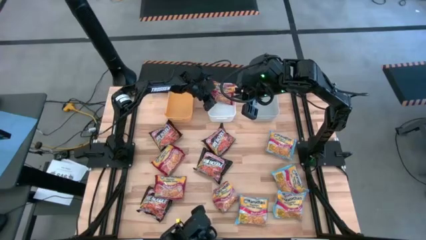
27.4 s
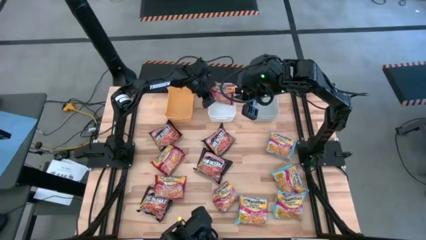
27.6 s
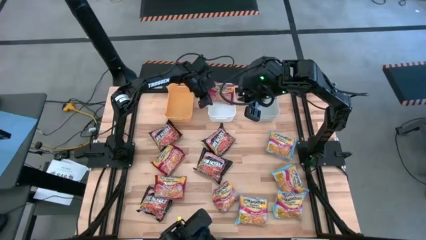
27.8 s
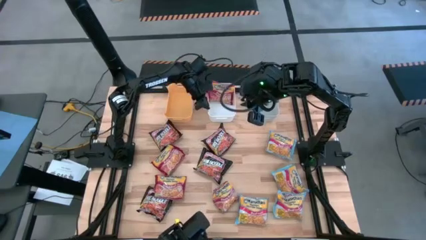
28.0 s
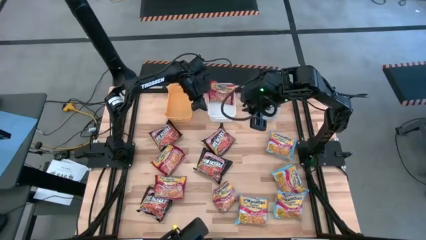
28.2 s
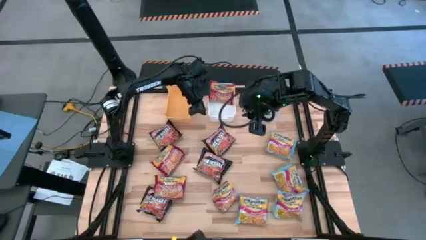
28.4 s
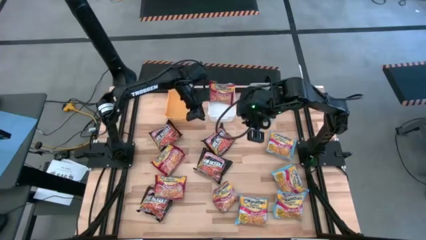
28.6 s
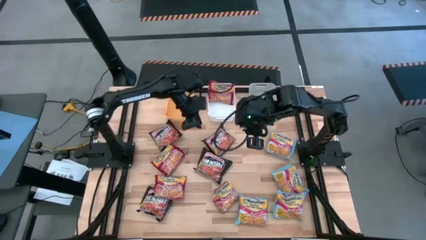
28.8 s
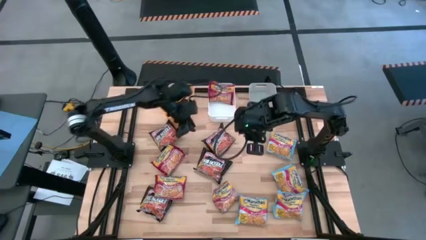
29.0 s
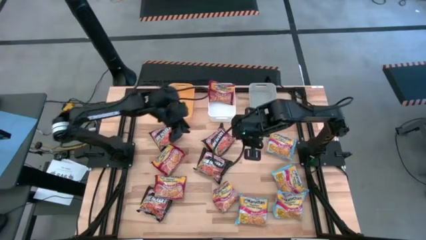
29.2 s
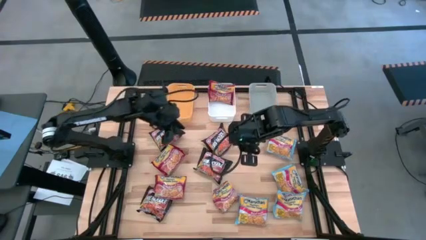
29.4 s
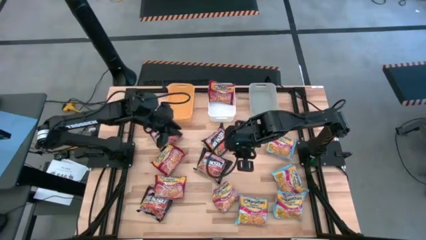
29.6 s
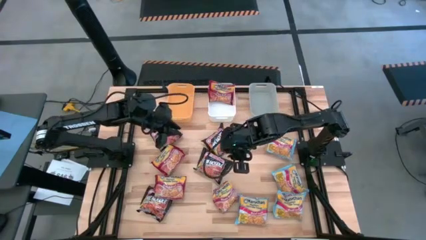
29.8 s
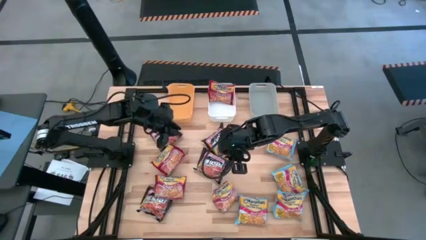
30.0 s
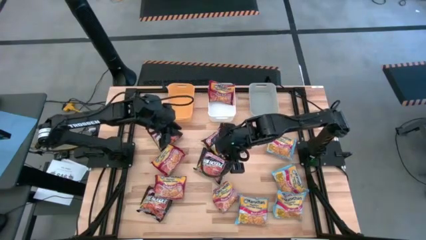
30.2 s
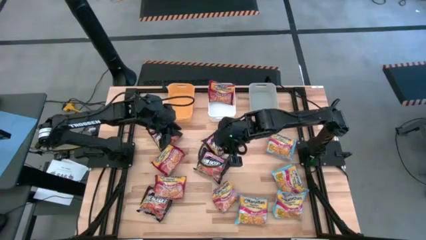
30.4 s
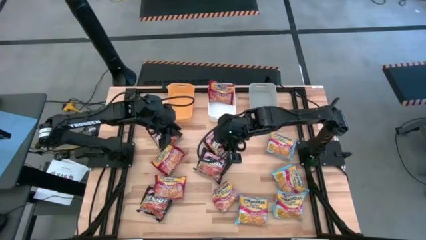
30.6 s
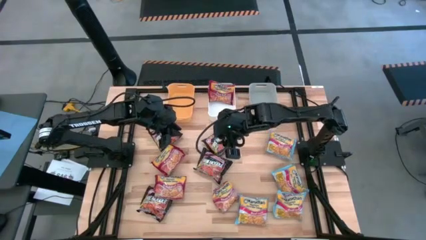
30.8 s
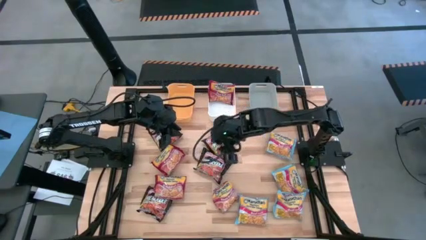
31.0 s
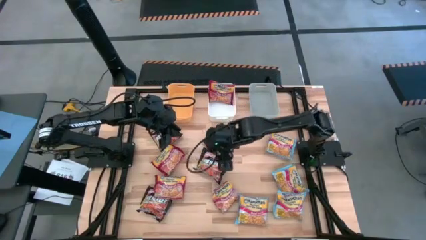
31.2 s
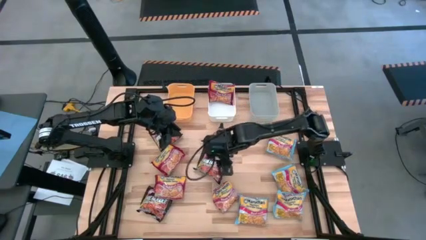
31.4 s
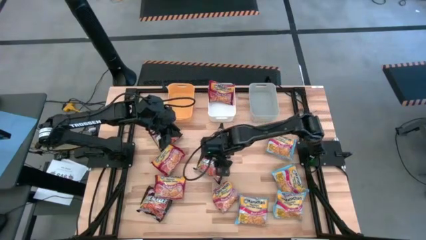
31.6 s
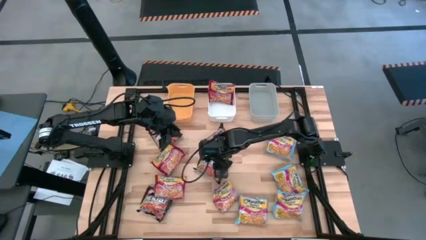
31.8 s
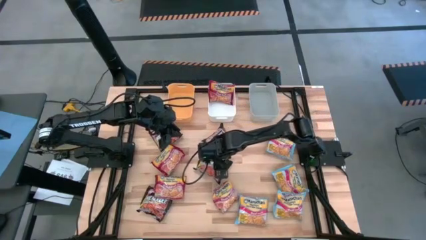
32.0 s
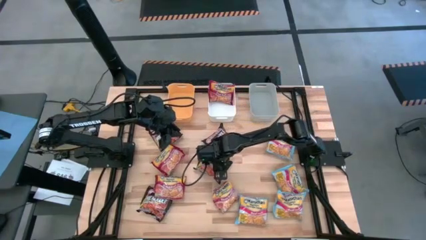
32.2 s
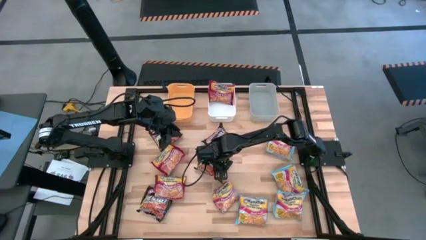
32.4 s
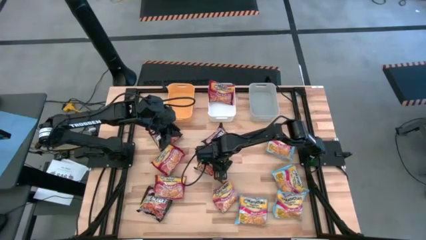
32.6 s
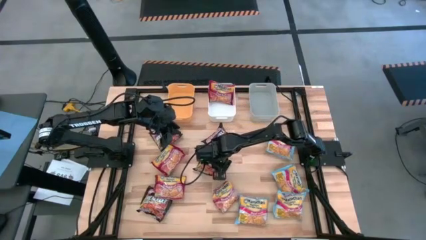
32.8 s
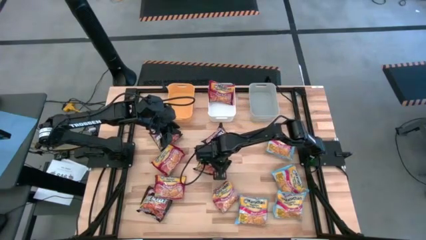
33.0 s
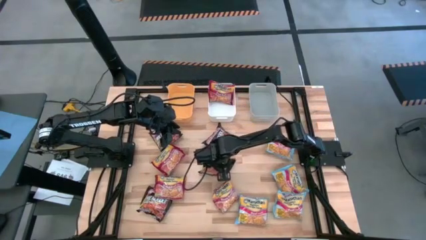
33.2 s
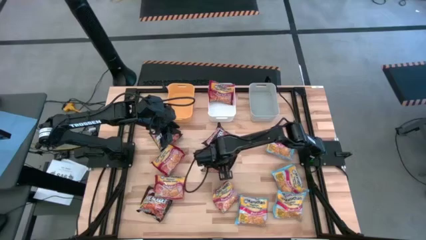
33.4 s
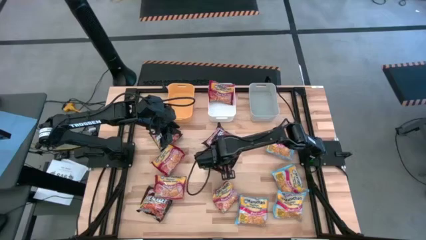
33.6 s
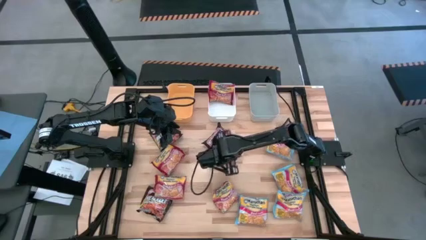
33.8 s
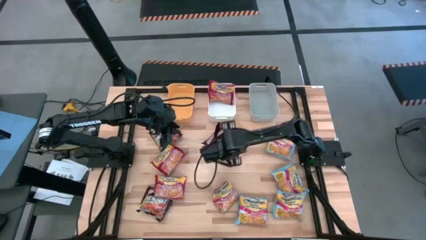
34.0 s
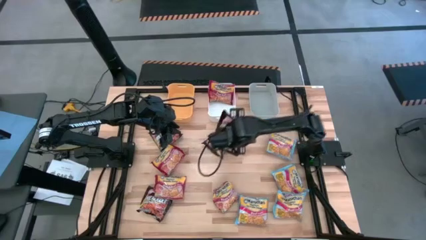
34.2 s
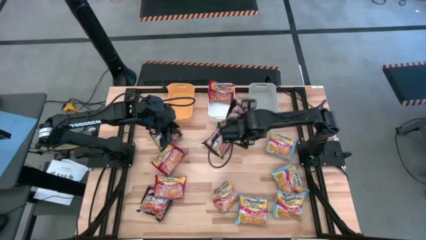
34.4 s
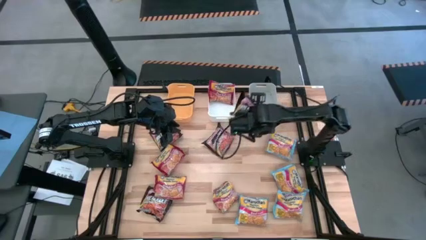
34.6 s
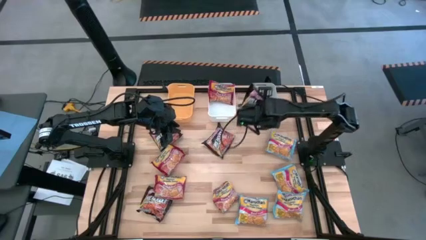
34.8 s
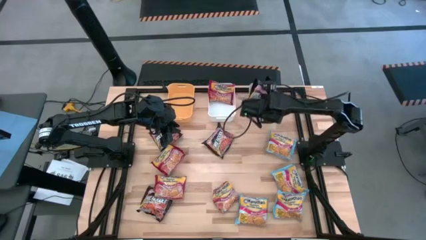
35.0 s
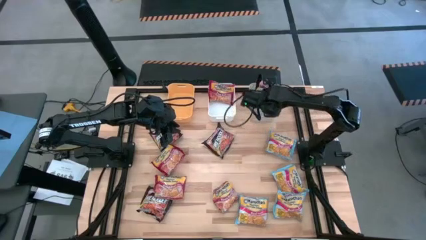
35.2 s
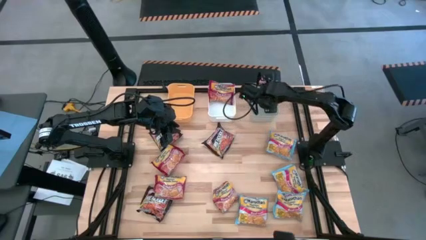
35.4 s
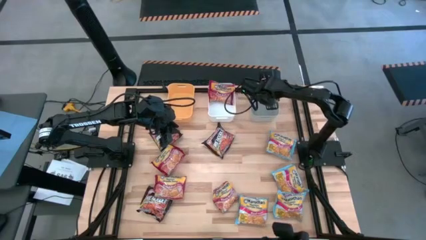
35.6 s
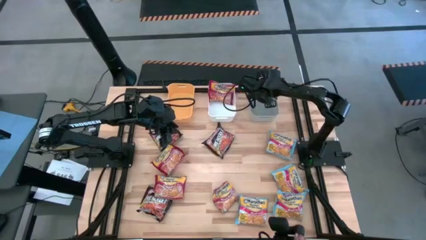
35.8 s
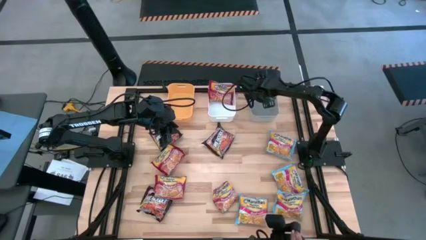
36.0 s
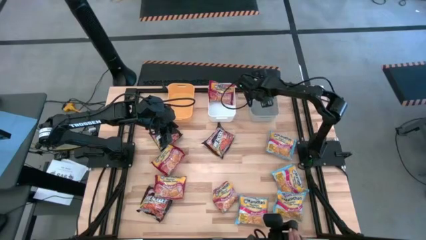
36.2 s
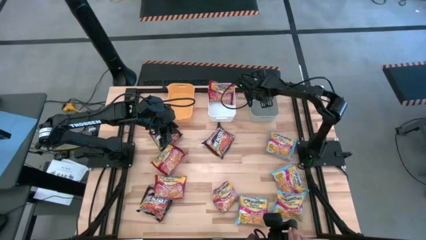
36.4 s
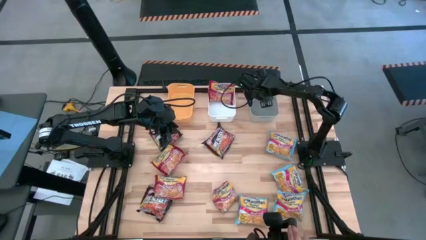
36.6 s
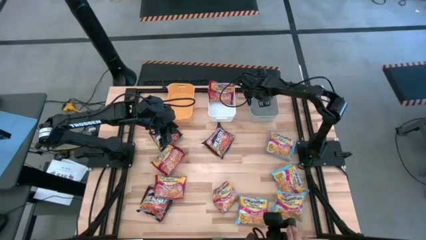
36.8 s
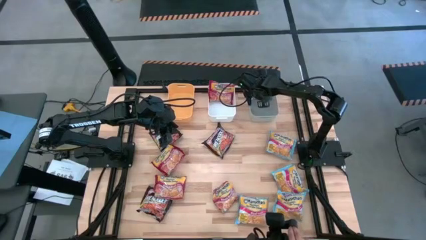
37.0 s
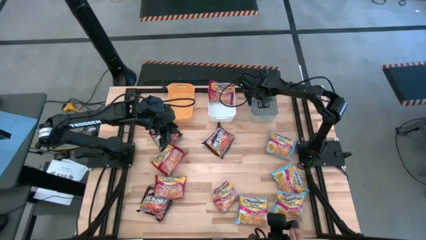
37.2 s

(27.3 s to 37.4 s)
Task: Sort Maruchan noodles
Put the black noodle pack into the gray bin

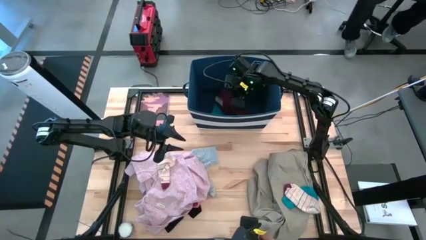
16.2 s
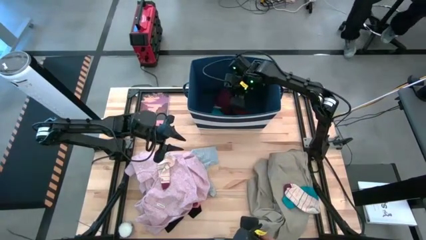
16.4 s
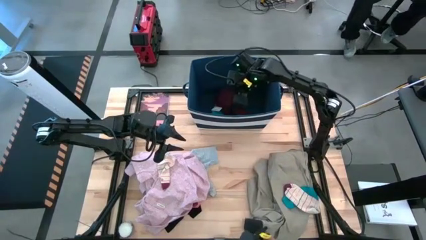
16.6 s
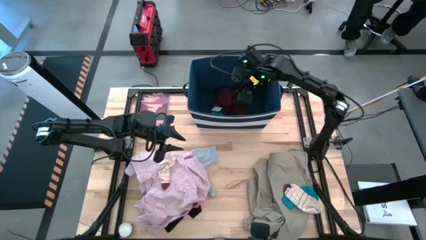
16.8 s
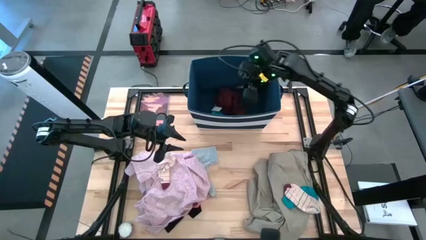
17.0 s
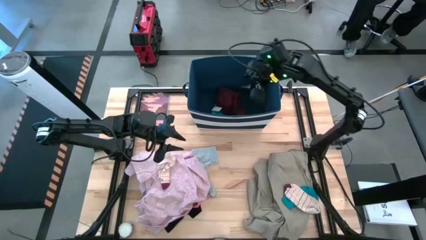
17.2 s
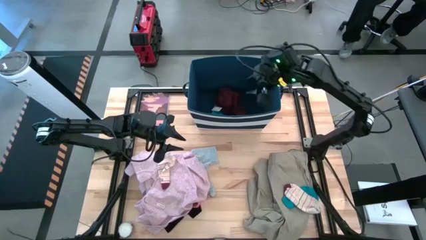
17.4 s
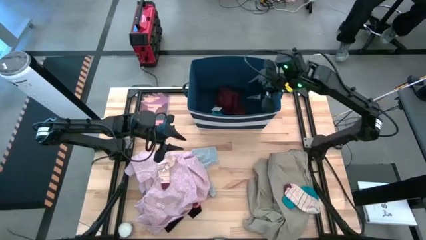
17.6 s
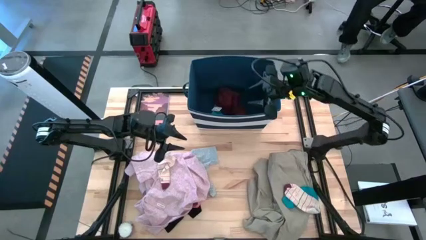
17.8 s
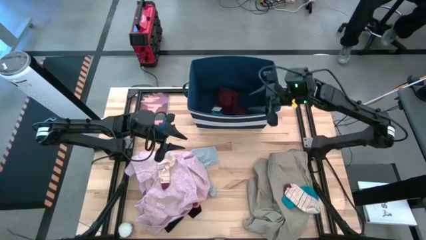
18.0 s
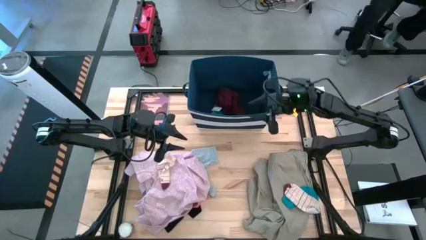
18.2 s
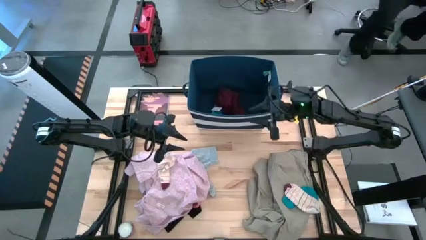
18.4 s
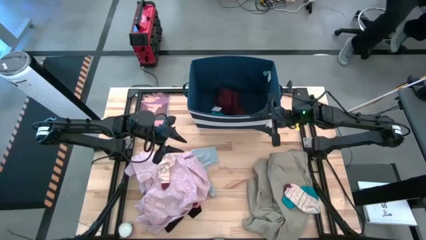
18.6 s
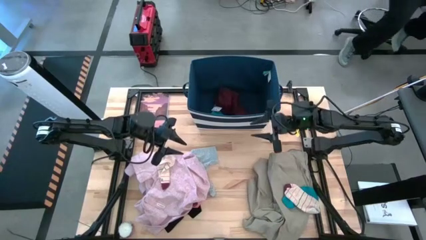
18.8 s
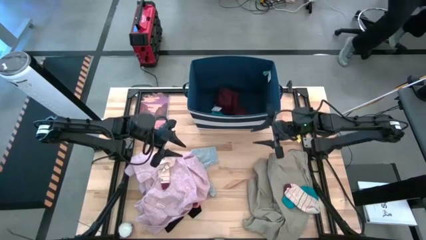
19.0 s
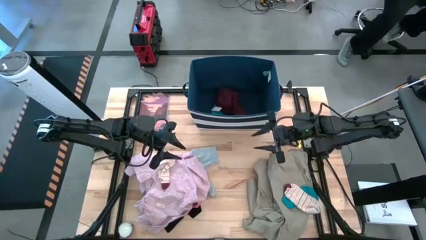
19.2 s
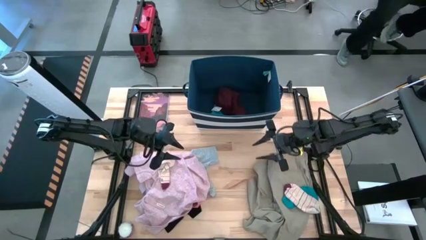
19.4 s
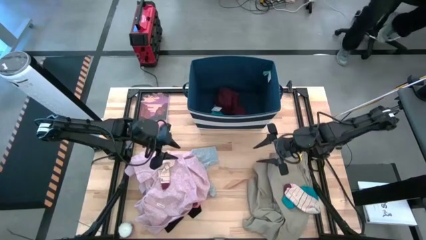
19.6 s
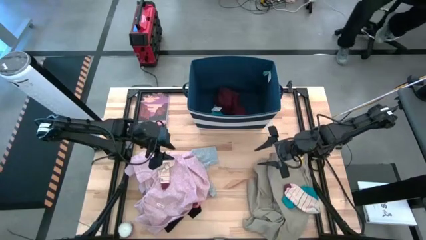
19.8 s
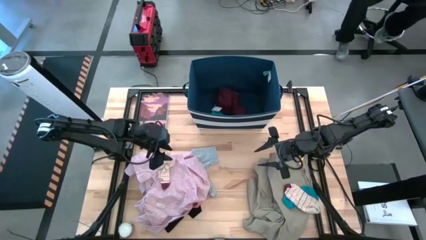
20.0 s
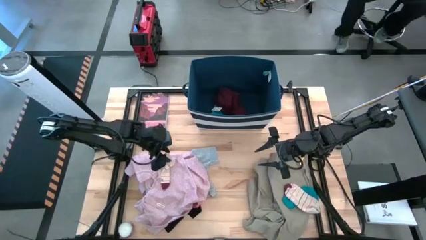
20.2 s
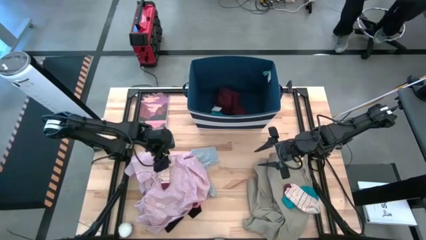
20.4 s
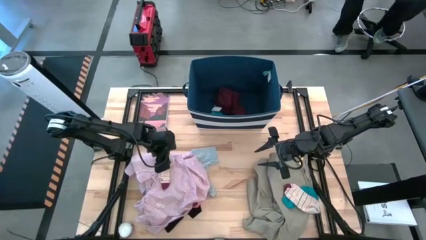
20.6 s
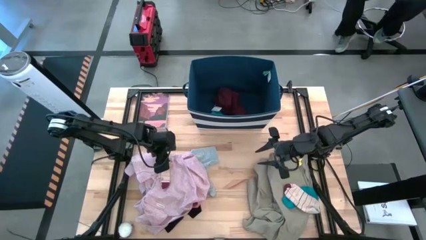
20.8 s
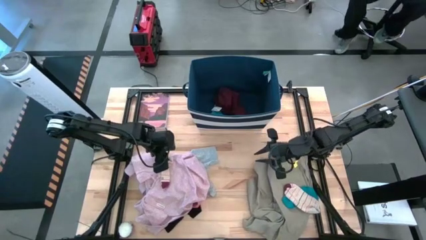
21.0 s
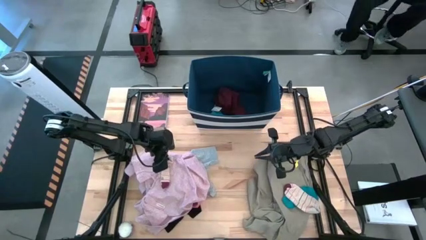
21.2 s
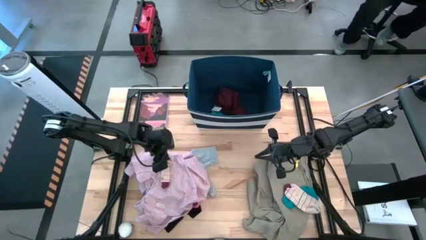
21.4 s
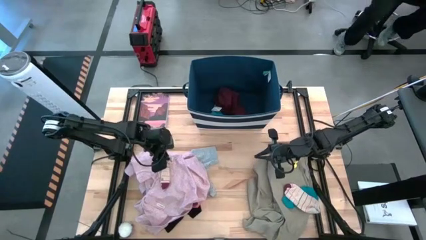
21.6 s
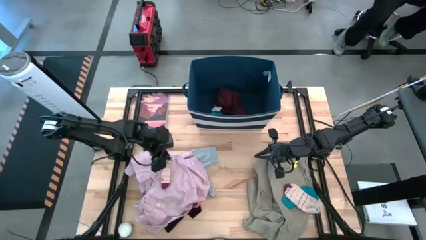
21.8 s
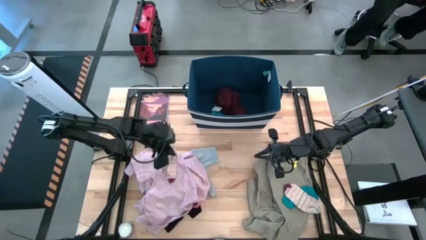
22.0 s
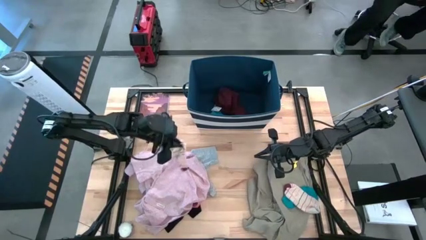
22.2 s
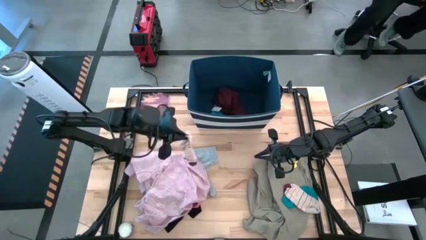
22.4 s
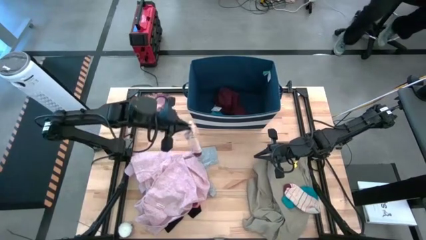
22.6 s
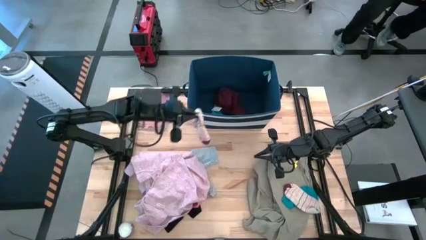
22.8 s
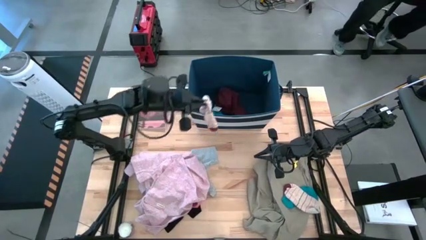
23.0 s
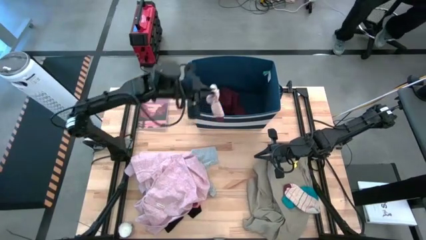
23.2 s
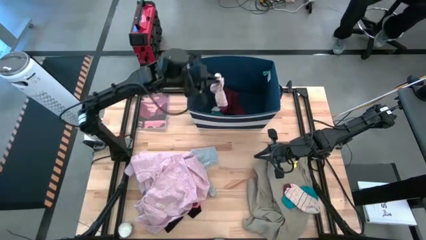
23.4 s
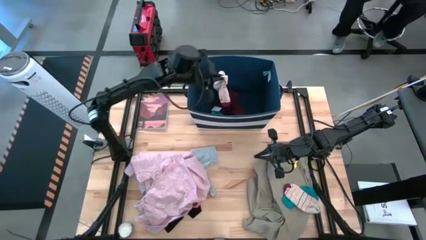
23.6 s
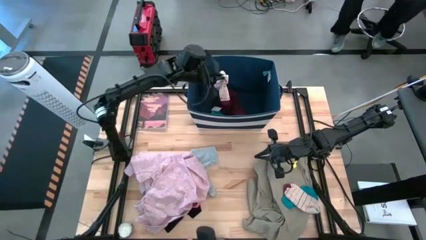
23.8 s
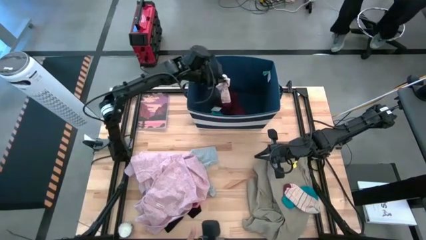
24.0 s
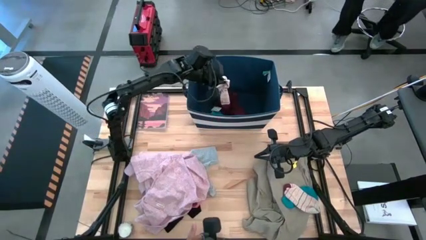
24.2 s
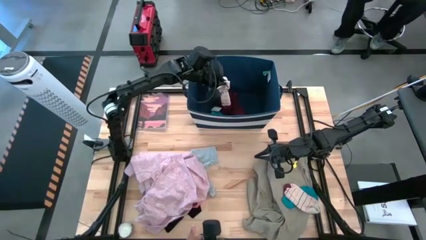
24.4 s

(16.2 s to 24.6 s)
Task: Sort clothes
Put the light pink striped sock into the blue bin
